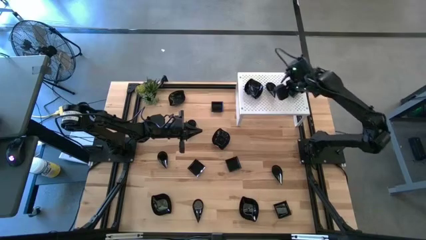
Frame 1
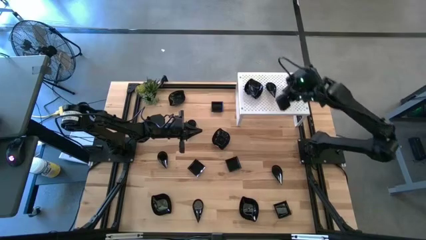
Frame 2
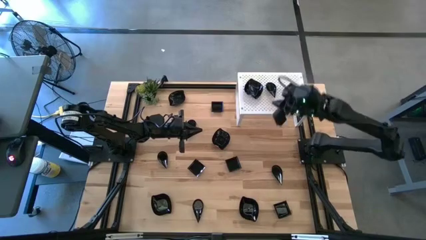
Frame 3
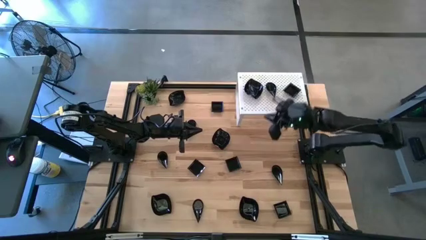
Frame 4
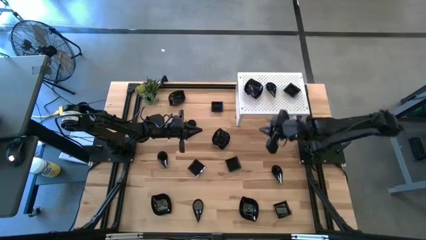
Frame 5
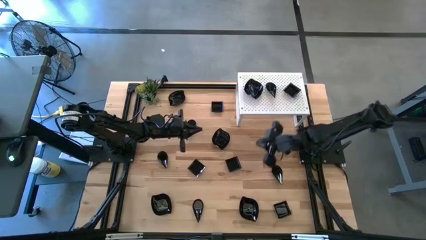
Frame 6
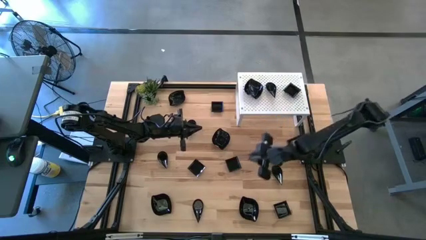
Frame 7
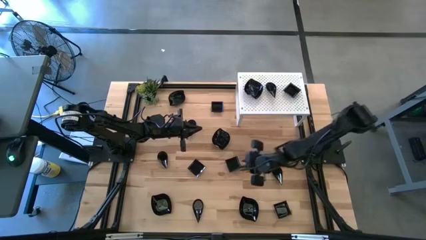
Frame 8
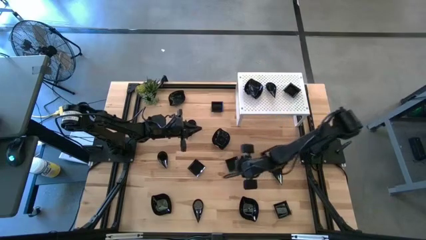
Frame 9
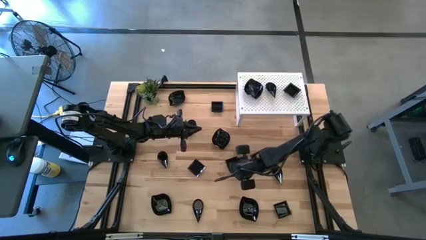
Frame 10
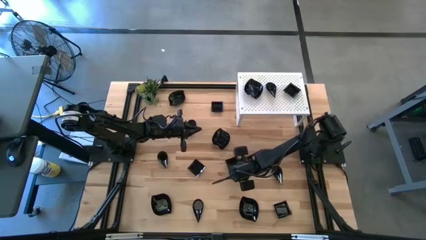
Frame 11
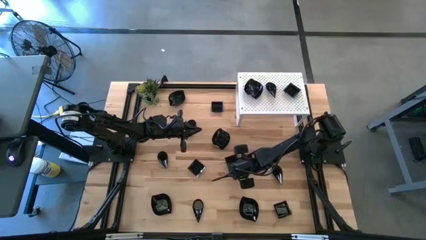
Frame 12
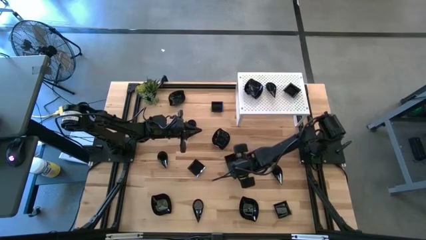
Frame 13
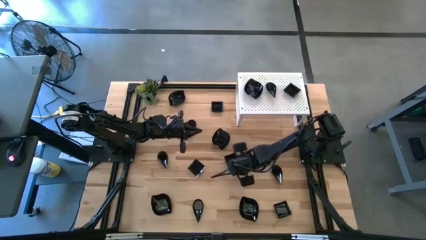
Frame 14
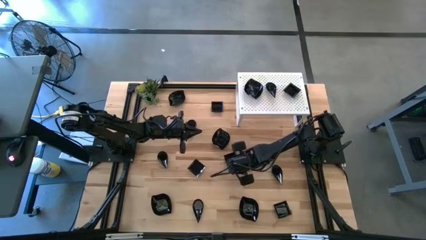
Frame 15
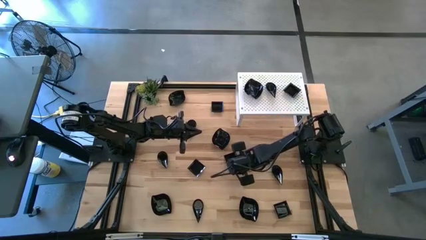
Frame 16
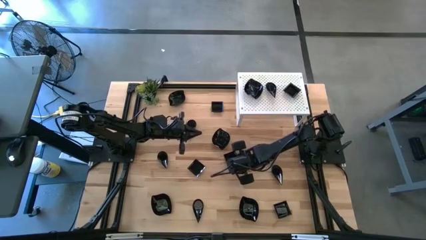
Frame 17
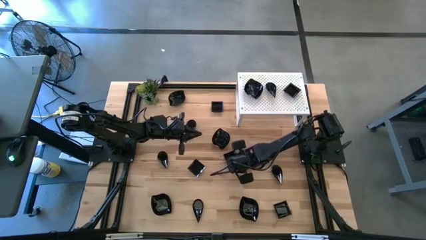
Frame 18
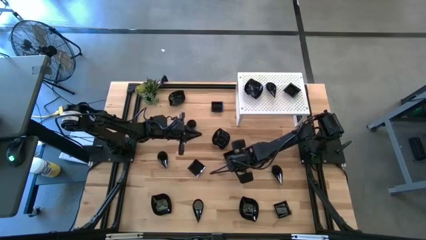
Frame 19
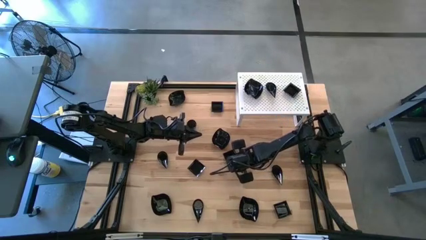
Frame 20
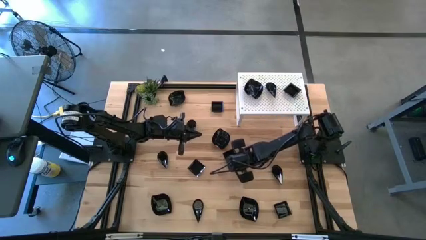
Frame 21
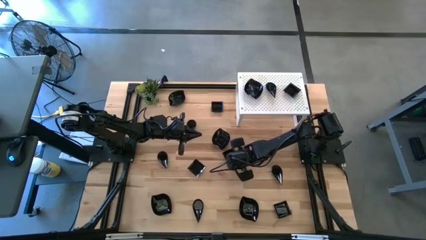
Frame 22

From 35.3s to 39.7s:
Task: Pick & Place Mini shaped plates
Stack the black square plate on top of the black square plate on the shelf

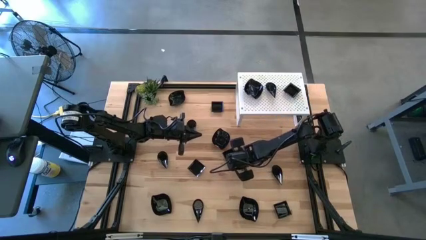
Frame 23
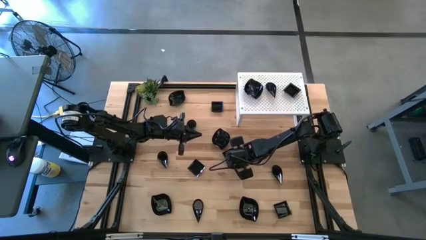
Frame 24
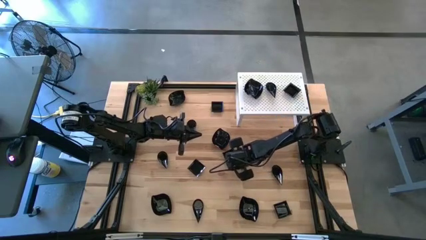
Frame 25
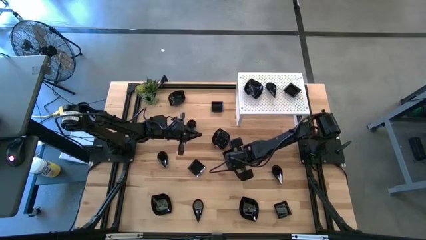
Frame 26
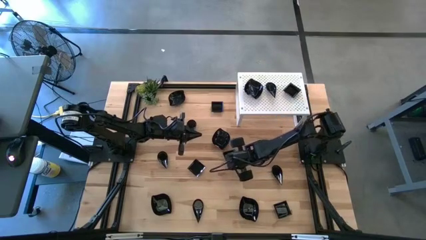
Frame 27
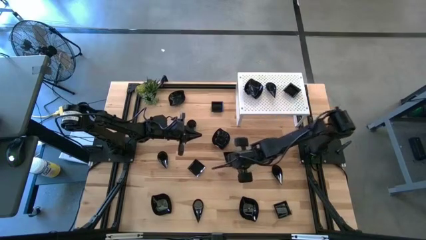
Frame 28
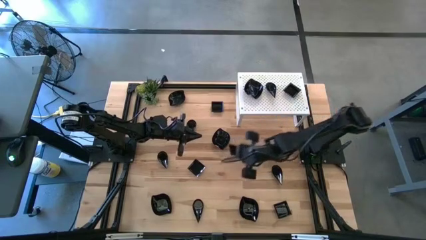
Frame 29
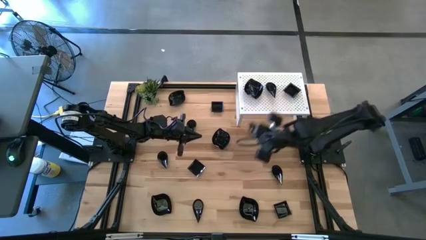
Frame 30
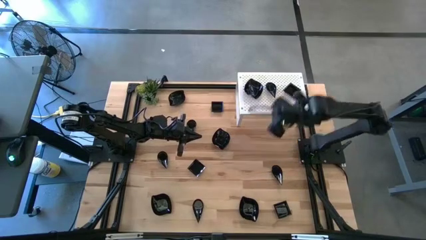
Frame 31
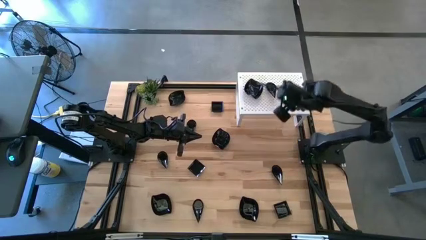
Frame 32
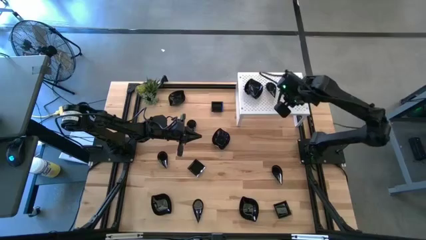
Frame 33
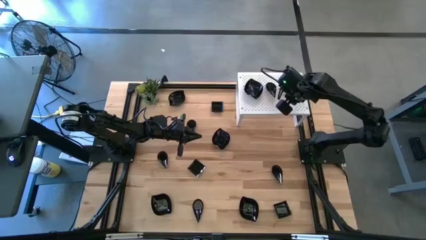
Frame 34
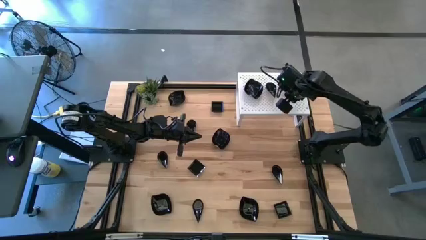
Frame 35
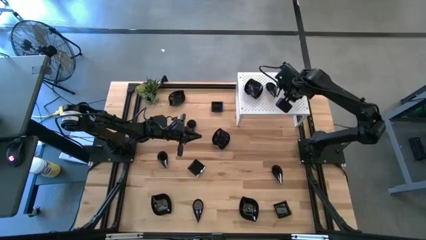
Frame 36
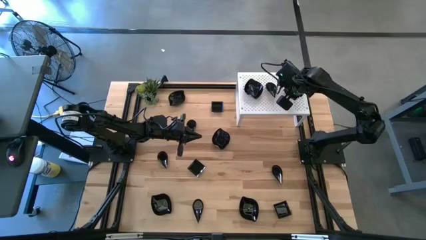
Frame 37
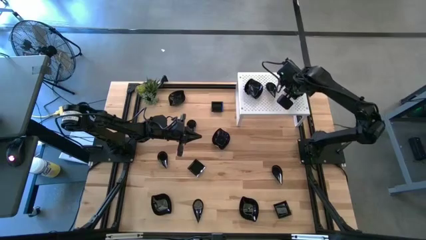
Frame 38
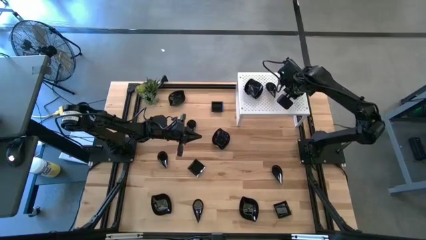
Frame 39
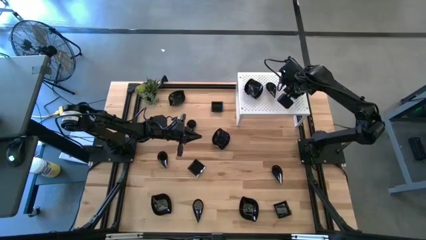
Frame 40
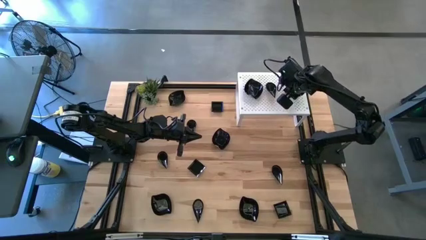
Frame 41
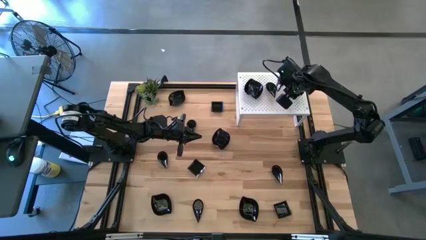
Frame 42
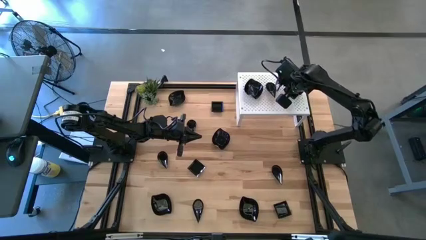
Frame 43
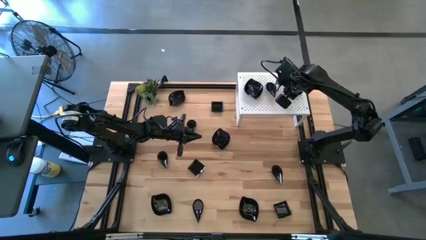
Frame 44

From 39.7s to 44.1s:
Stack the black square plate on top of the black square plate on the shelf

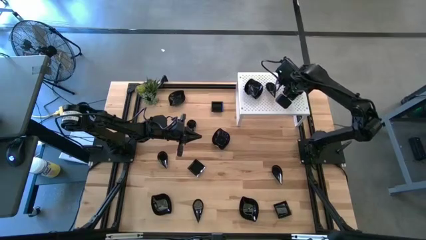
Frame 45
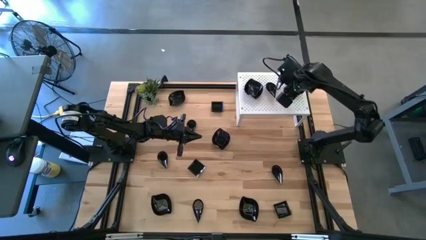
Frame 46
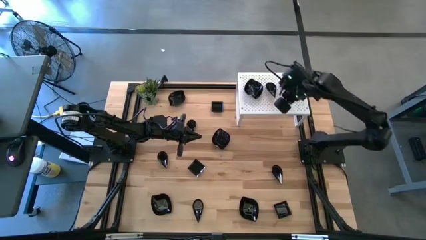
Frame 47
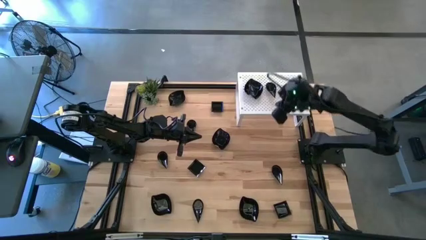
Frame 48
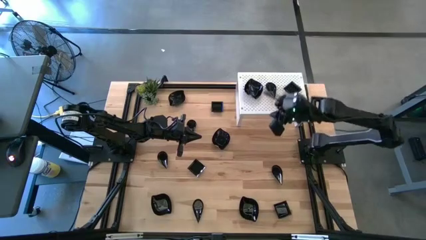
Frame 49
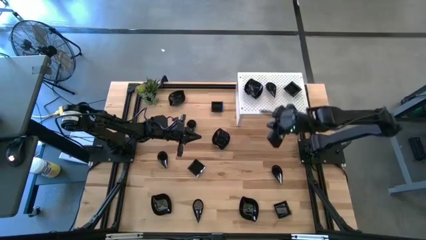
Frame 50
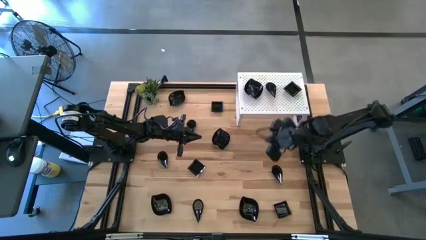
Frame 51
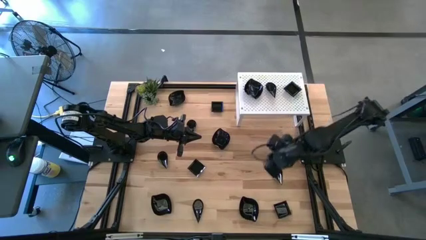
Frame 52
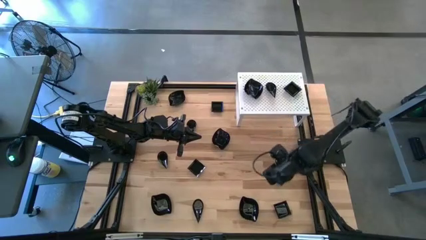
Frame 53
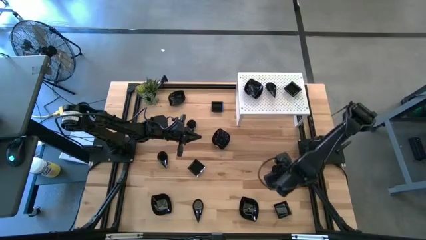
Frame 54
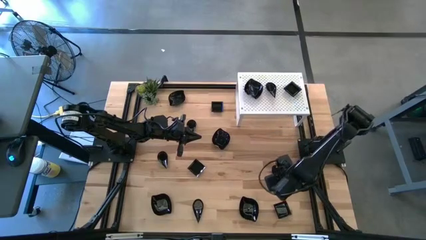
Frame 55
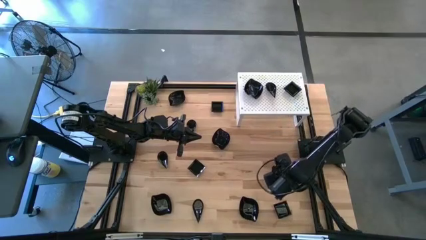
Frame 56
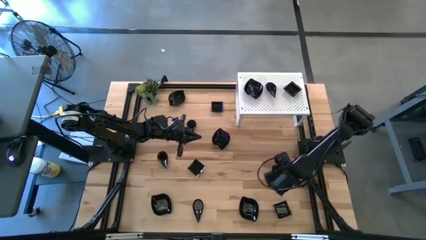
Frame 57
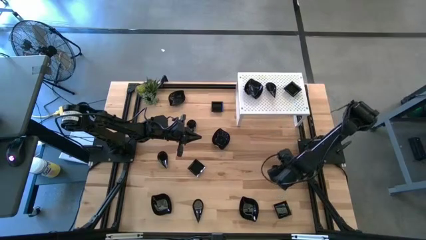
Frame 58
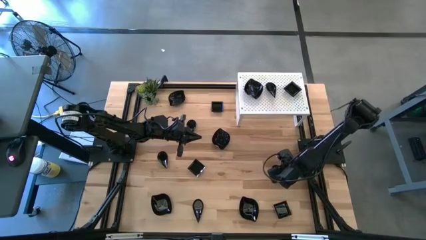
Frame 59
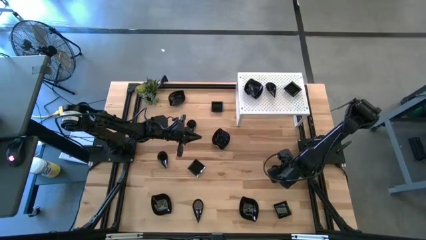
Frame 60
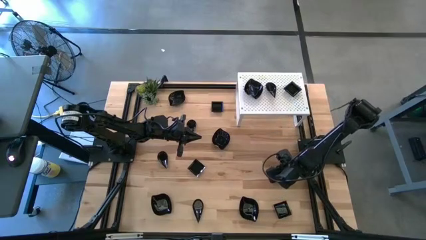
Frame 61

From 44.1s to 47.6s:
Stack the black drop-shaped plate on top of the black drop-shaped plate on the shelf

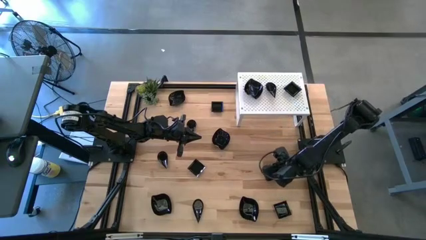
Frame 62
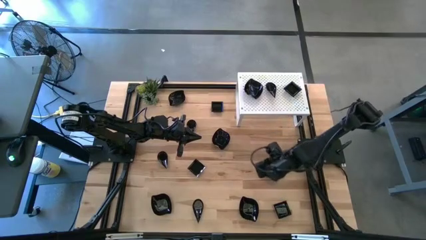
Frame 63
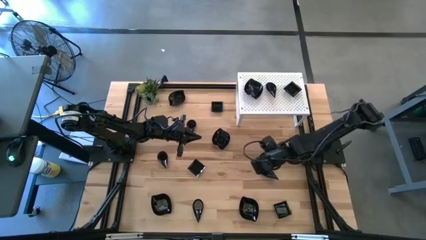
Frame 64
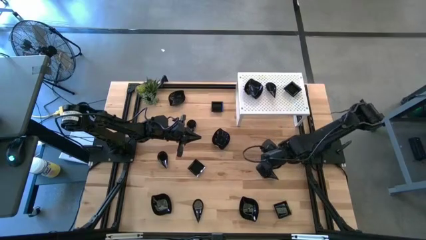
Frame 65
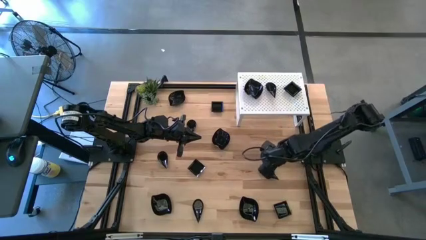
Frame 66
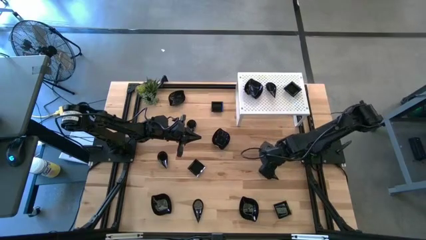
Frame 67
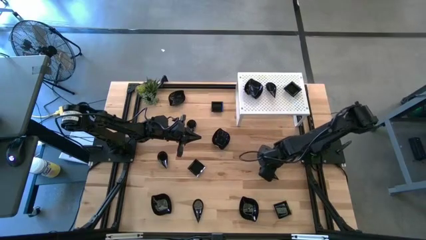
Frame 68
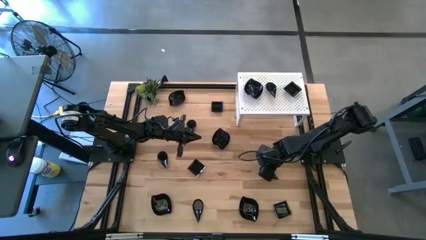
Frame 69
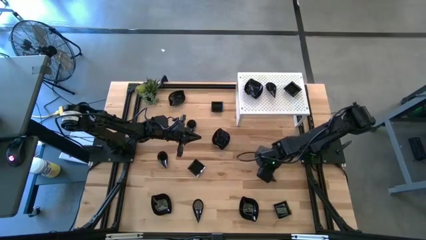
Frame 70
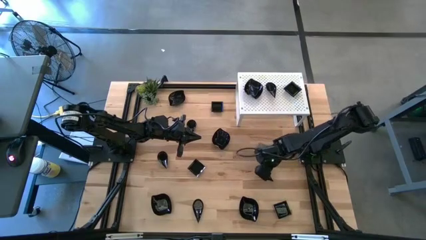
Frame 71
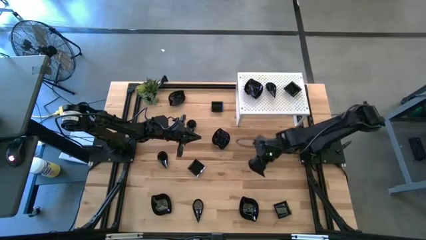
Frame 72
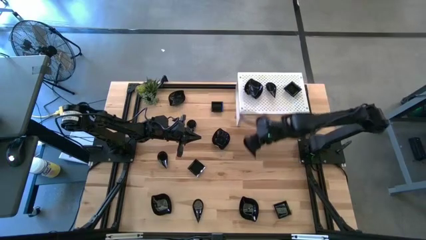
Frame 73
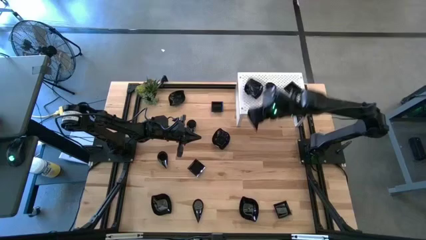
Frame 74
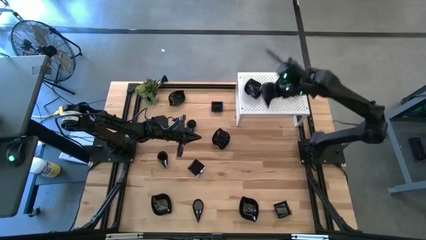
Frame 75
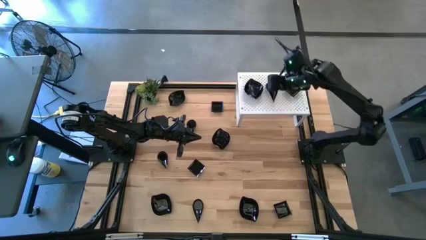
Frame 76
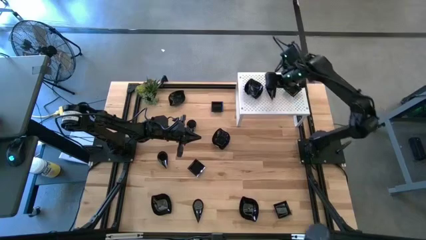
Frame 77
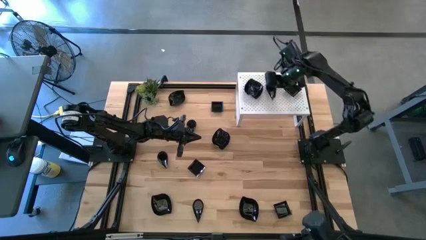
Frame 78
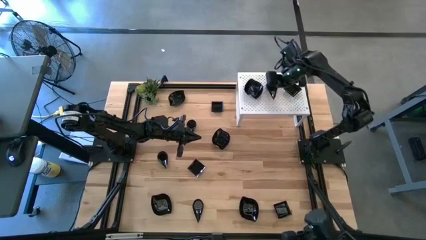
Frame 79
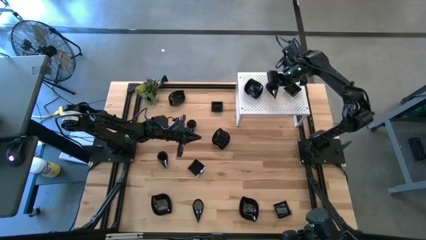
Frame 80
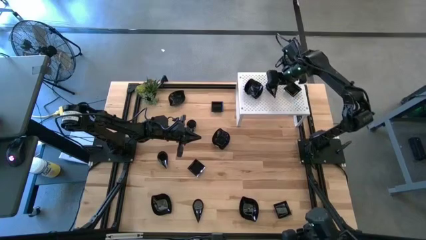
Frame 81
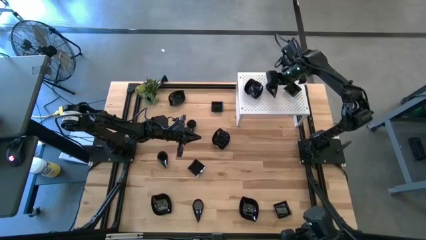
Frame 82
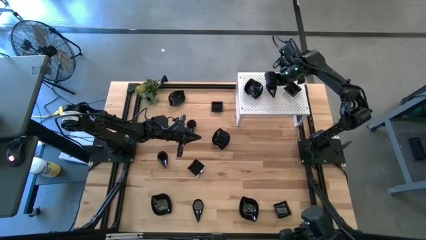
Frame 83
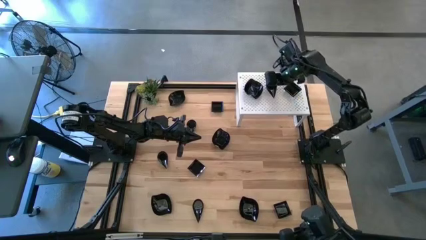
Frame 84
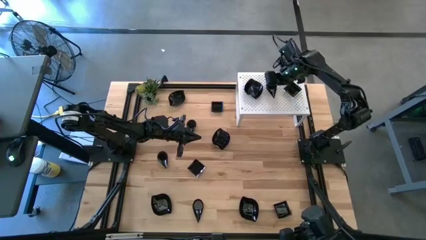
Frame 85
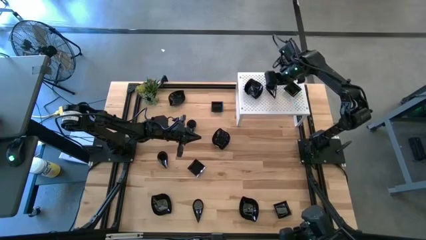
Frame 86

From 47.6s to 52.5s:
Stack the black drop-shaped plate on top of the black drop-shaped plate on the shelf
